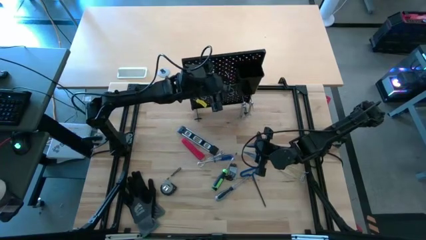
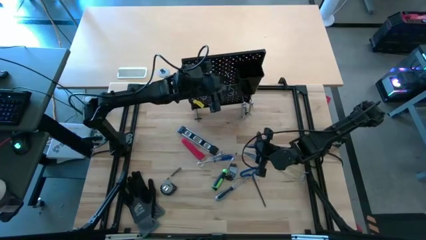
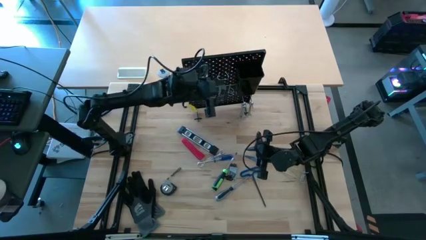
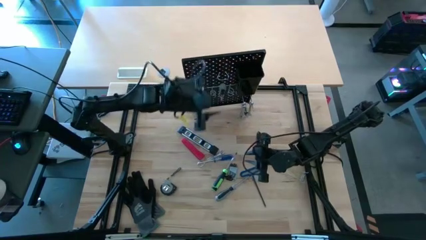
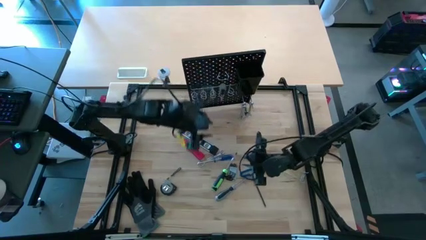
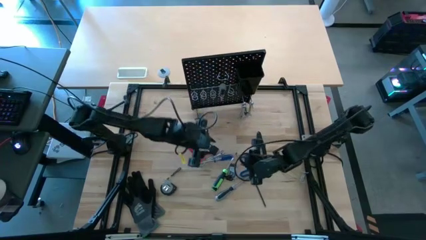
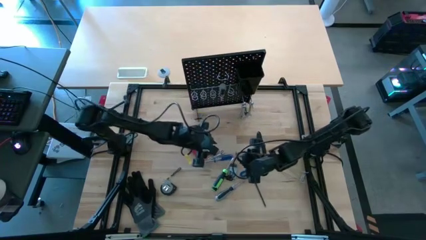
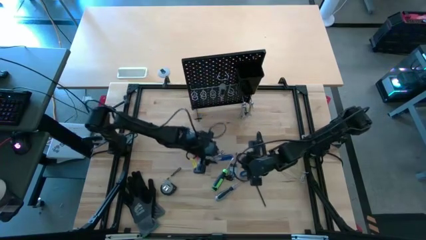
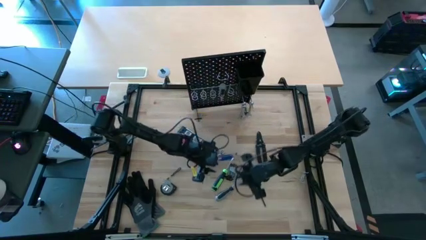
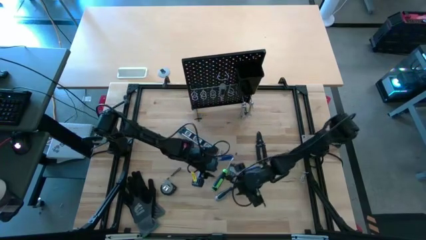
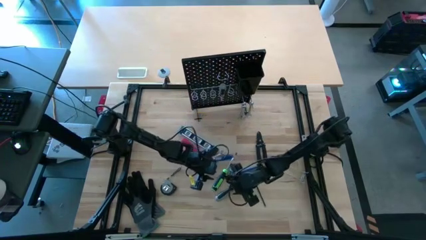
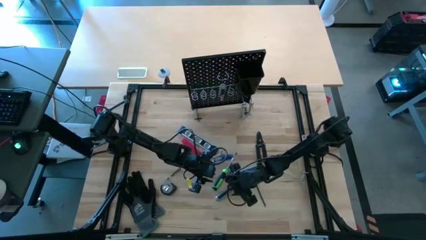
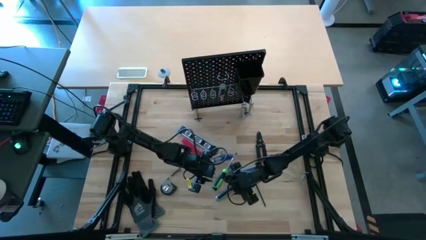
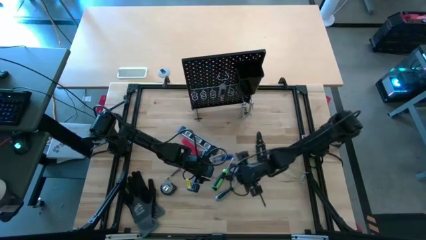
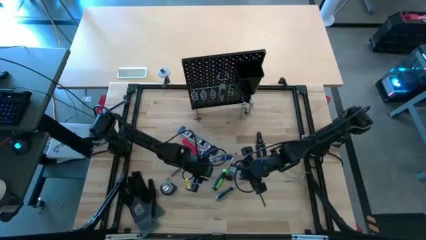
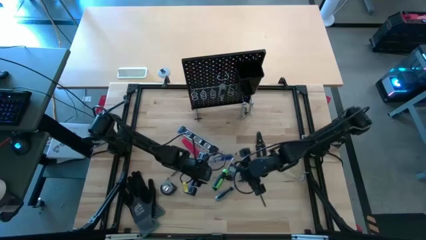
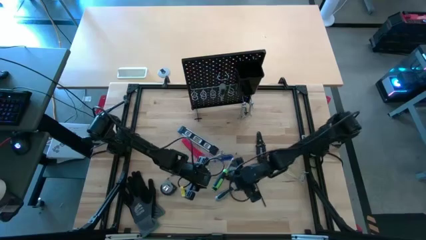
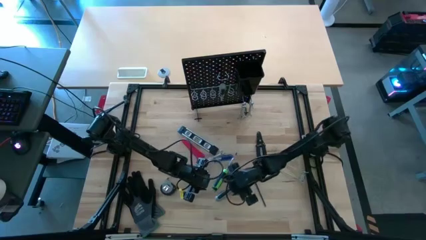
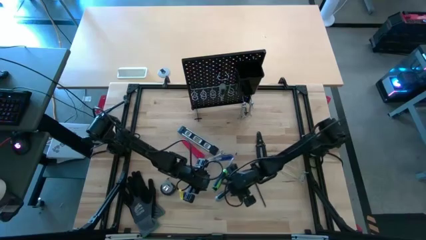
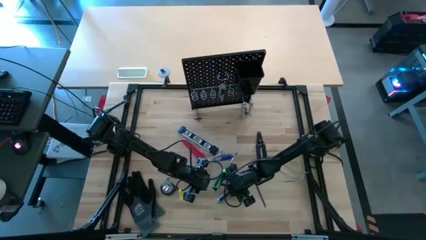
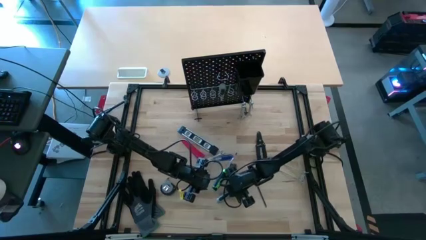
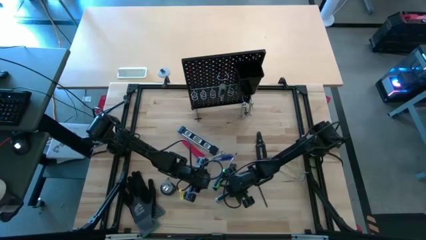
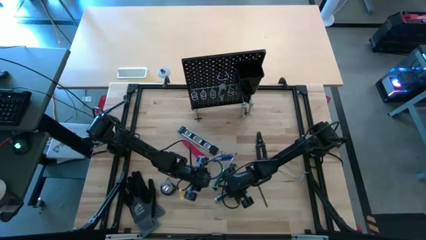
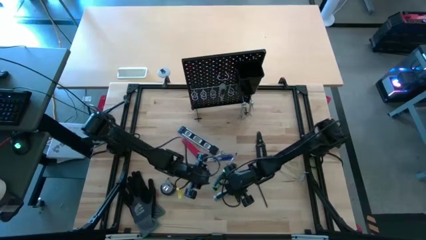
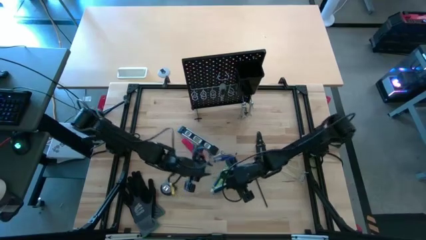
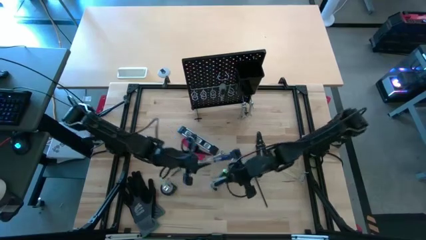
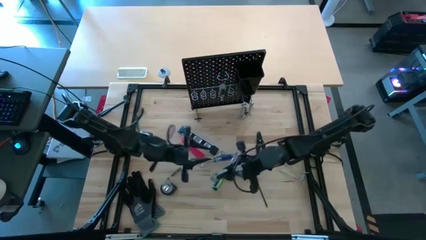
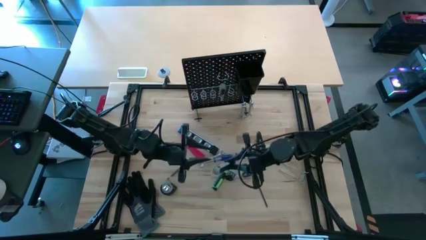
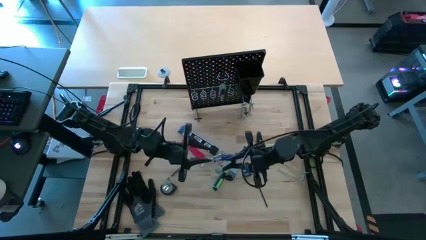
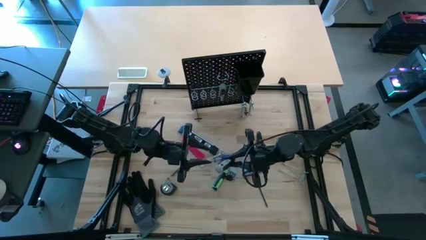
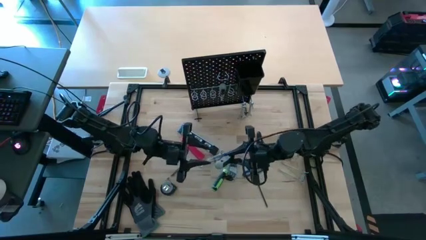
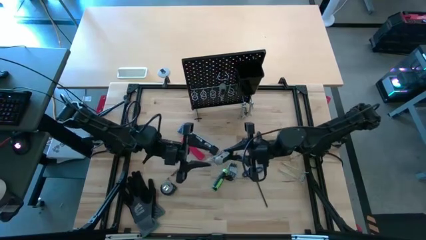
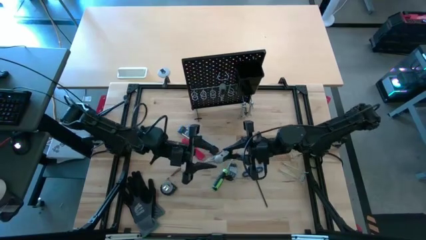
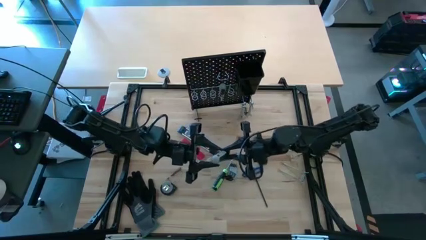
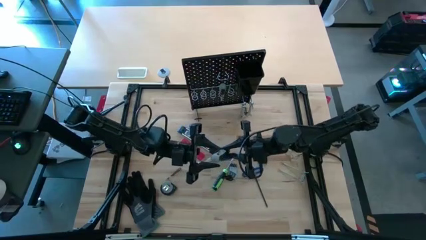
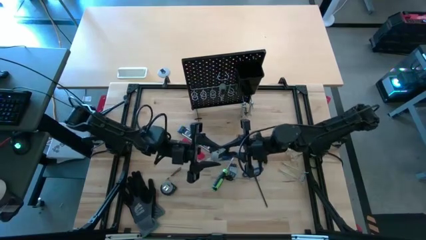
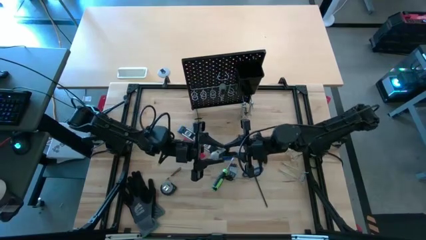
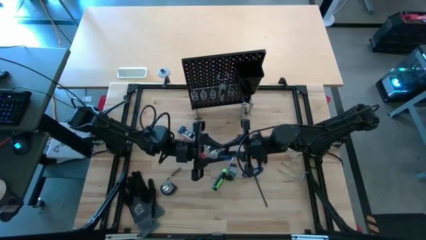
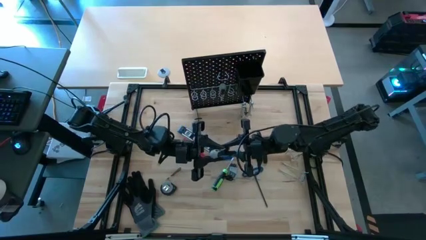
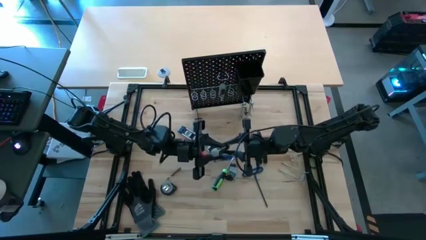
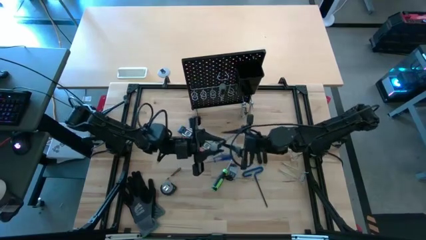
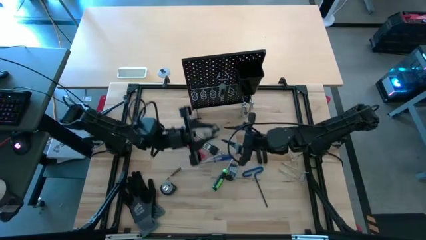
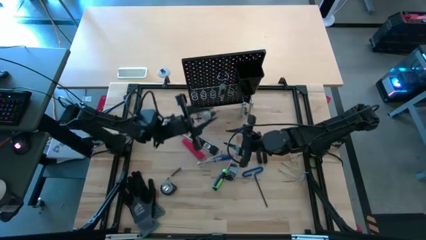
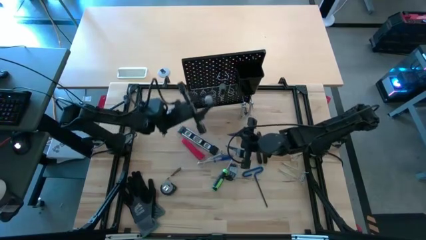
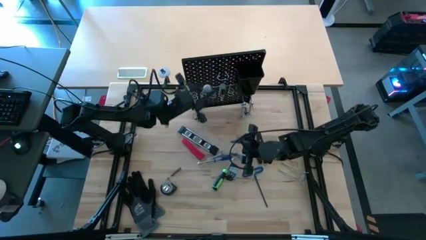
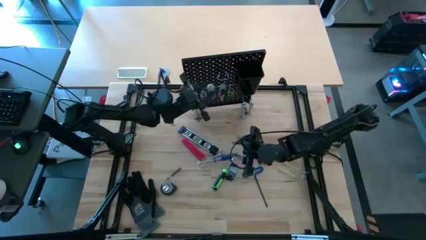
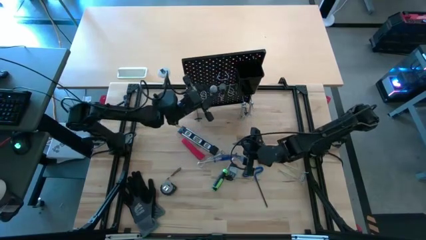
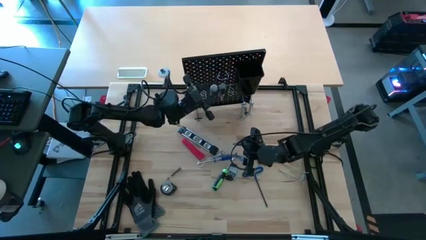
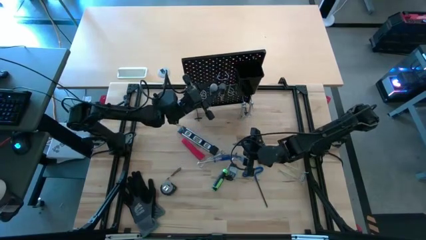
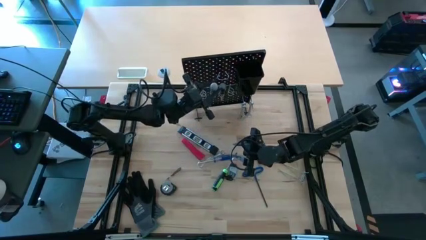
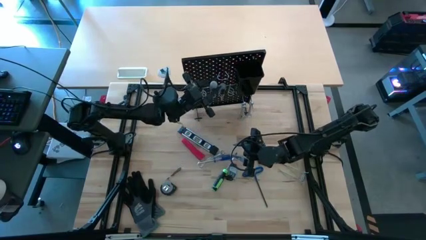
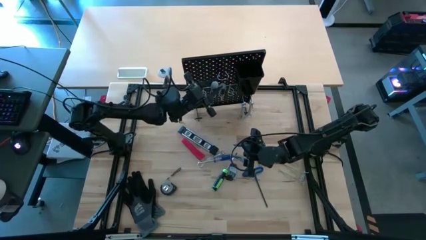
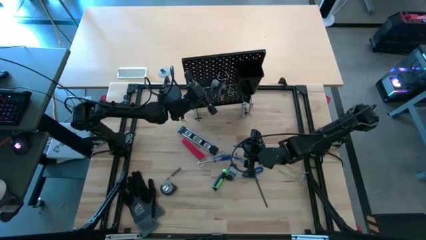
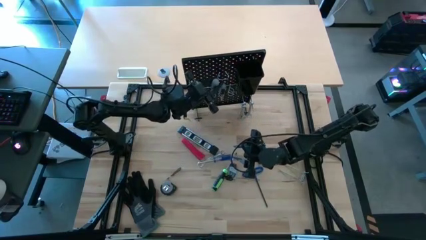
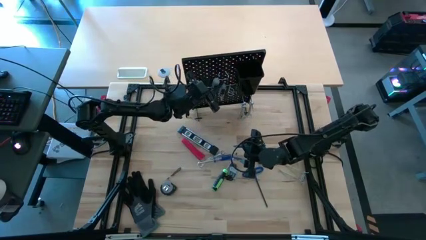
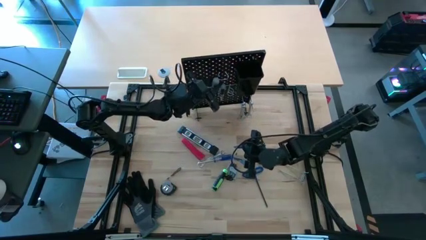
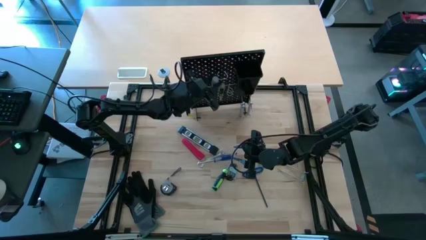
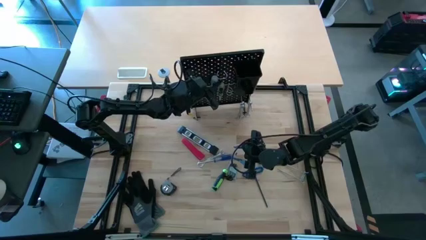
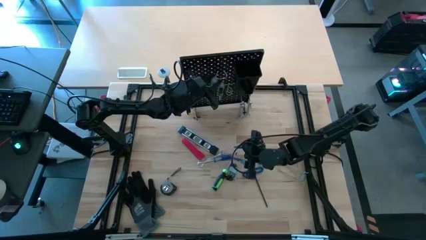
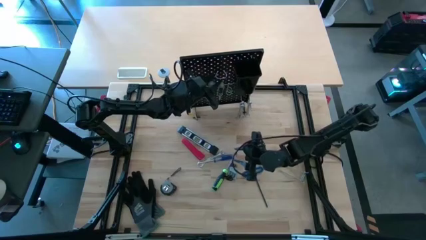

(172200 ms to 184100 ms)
Task: Hang tools onto peg board
Hang the grey screwdriver onto the pegboard

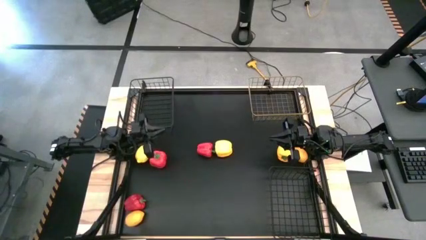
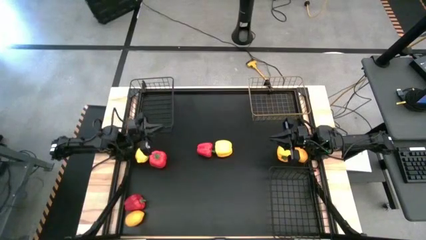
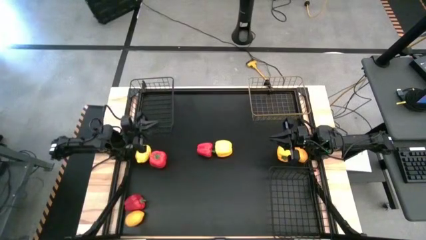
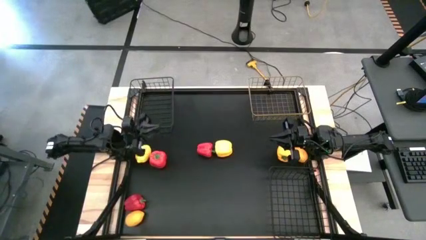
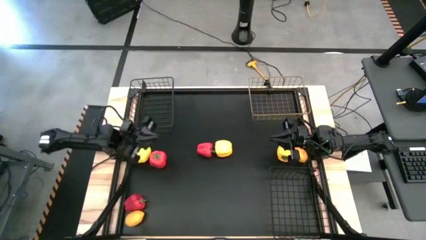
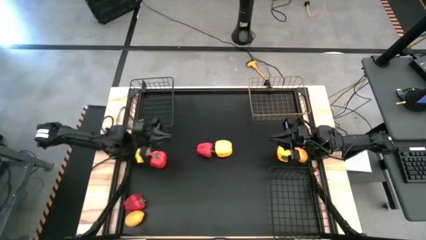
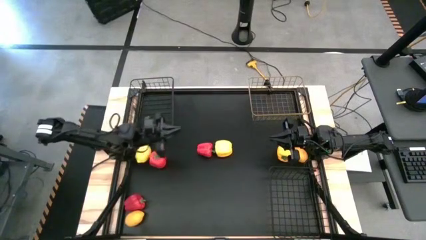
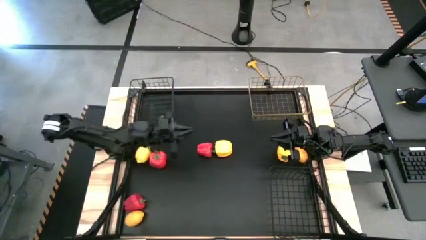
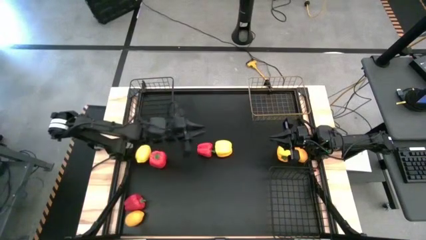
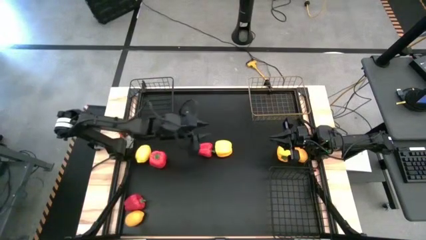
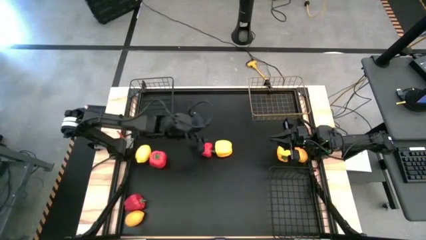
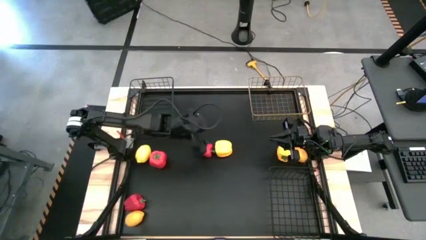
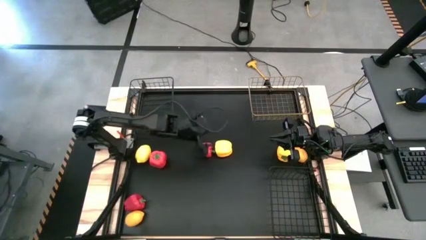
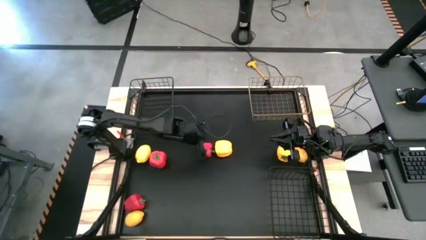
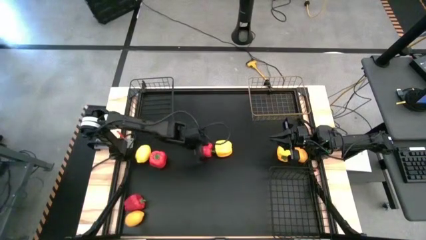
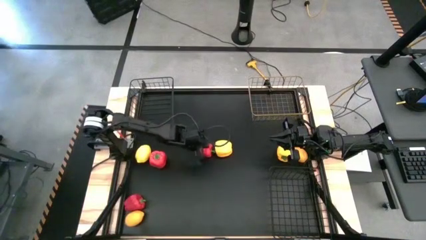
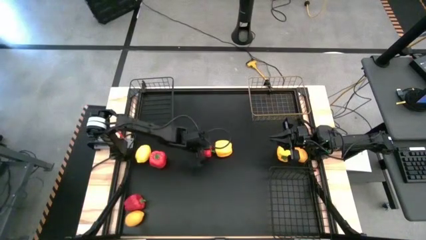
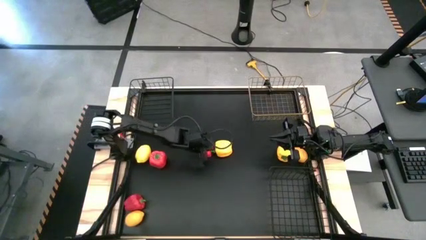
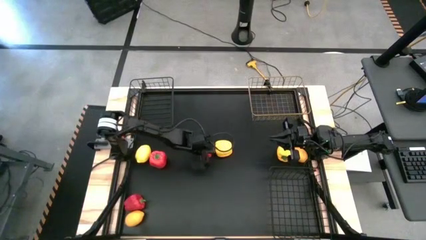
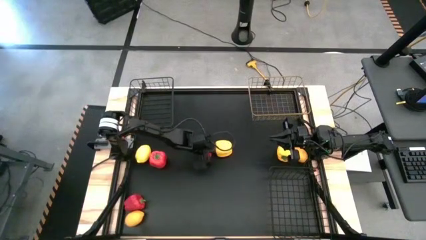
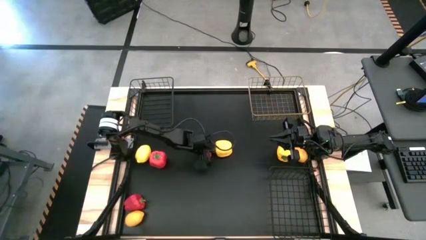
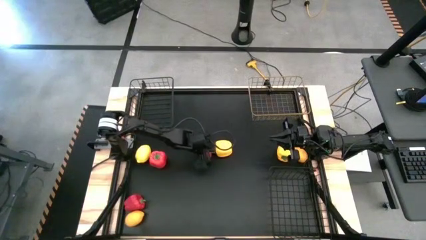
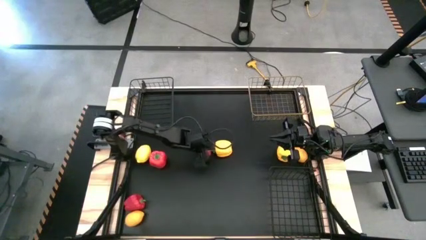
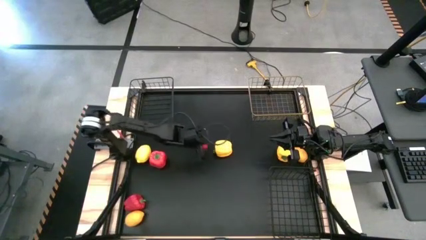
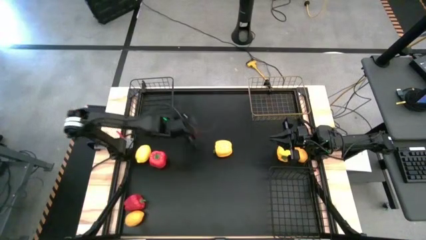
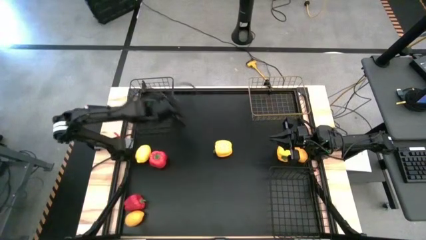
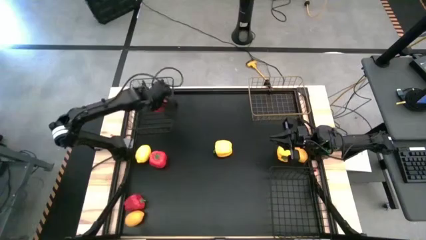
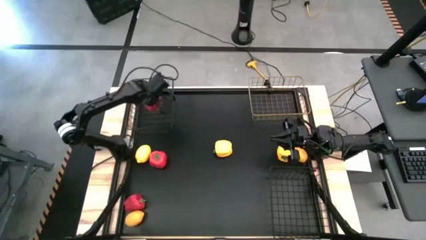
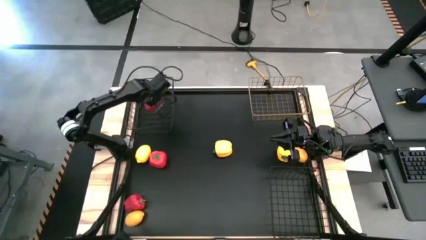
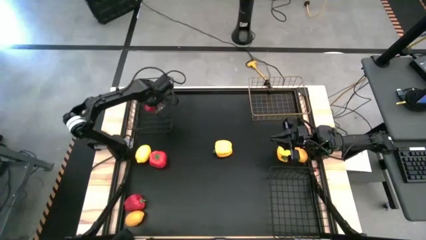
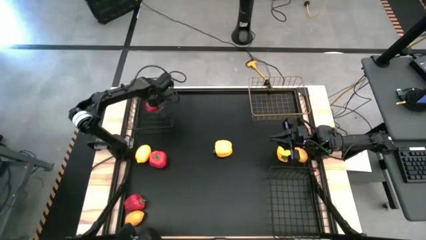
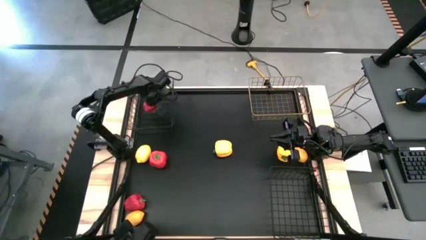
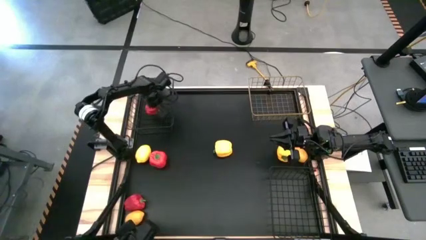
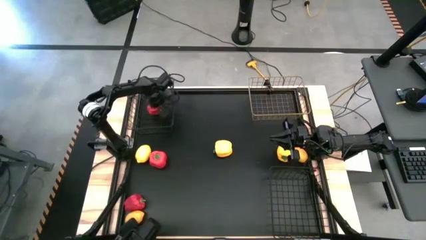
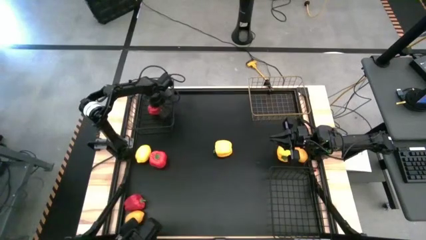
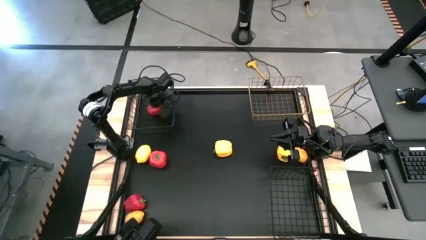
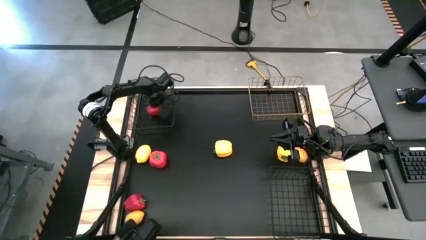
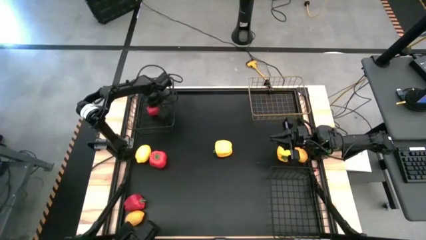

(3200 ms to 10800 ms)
Task: Sort produce into baskets
Put the top right red bell pepper into the top black mesh basket
